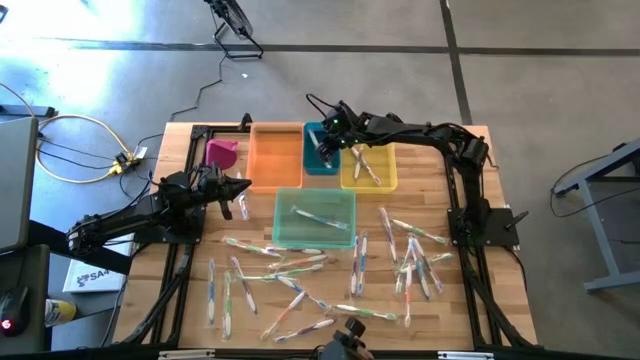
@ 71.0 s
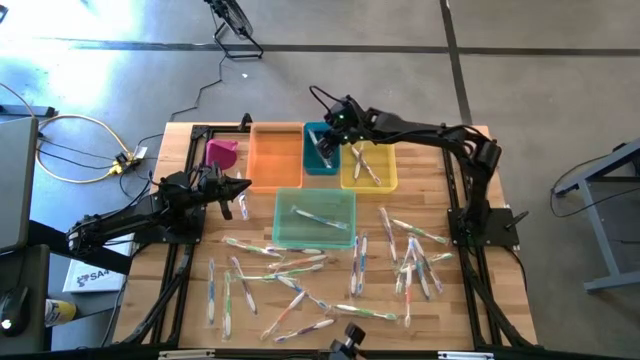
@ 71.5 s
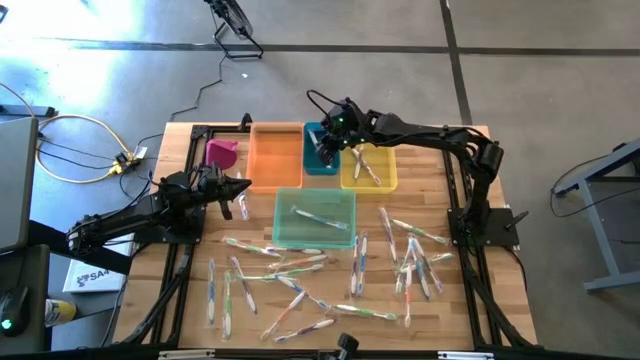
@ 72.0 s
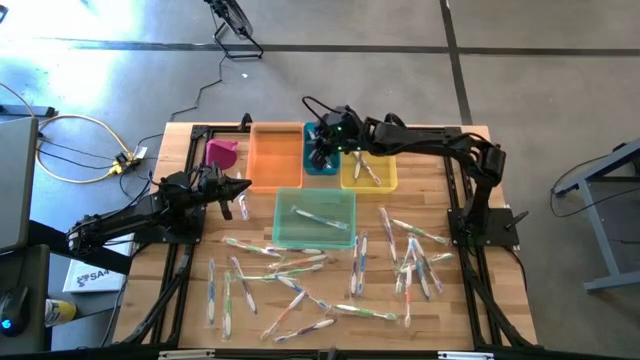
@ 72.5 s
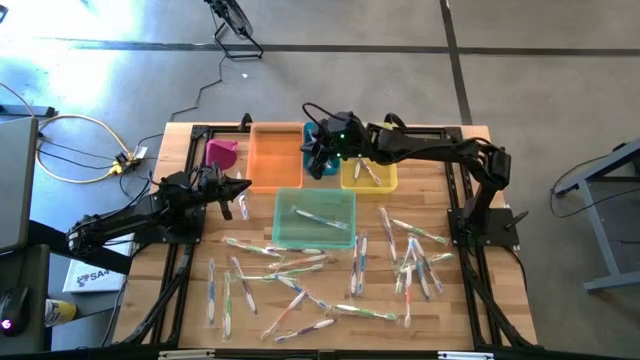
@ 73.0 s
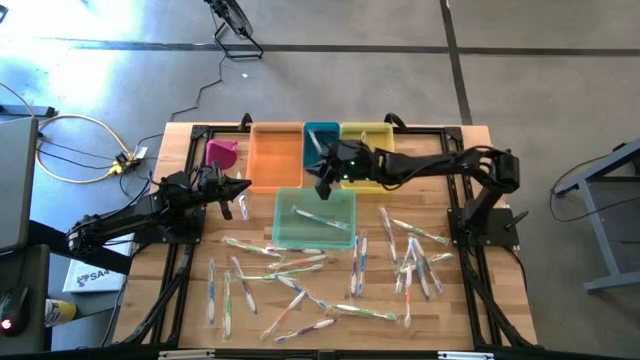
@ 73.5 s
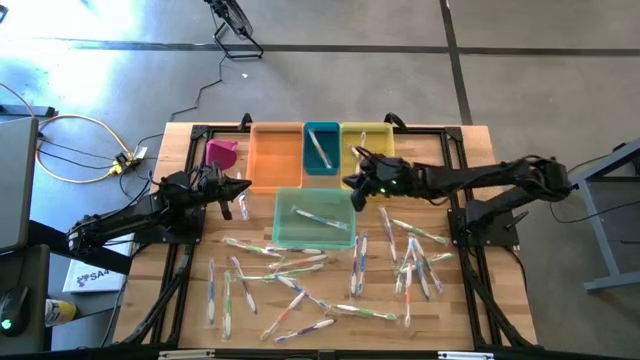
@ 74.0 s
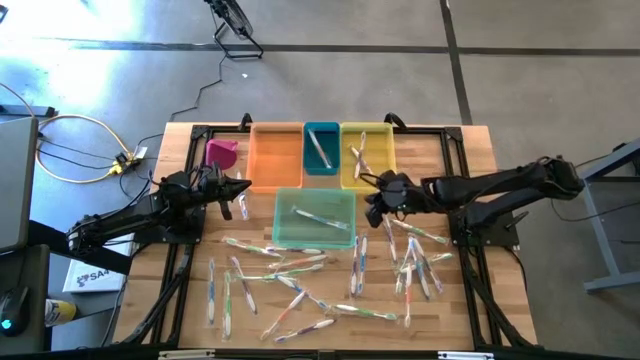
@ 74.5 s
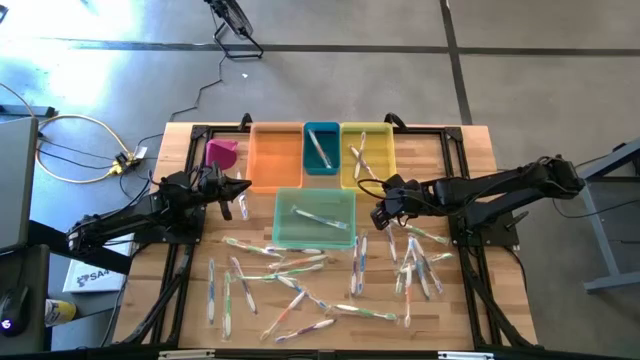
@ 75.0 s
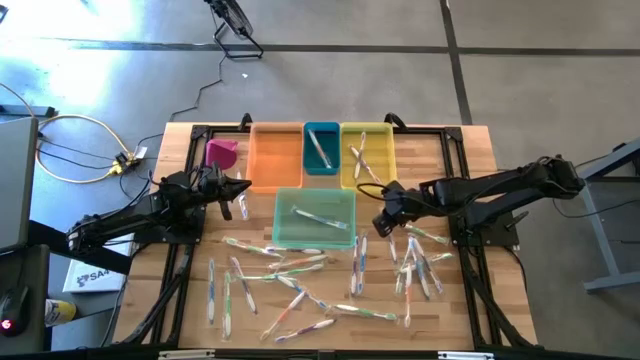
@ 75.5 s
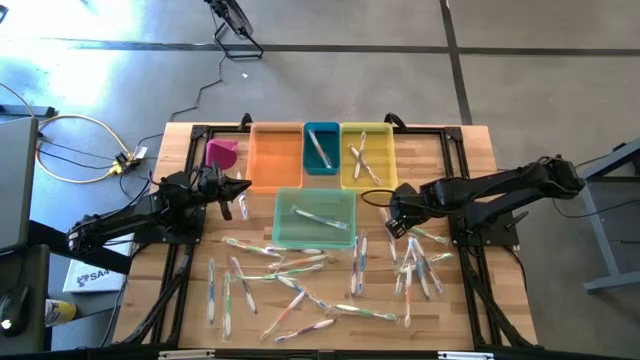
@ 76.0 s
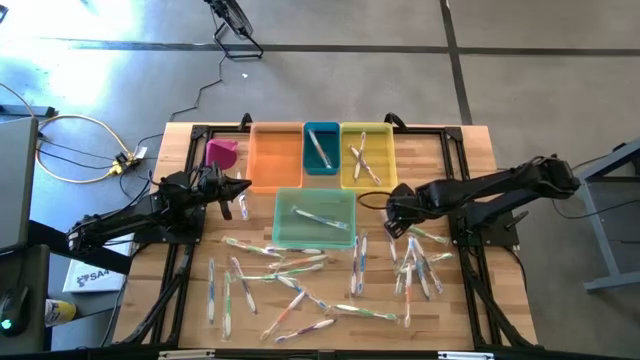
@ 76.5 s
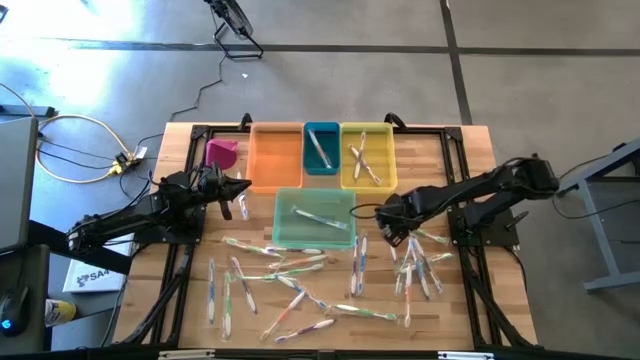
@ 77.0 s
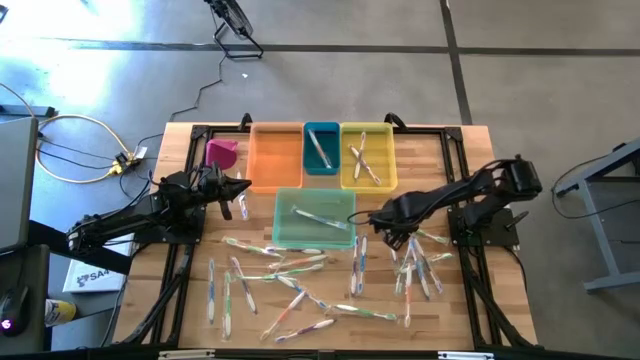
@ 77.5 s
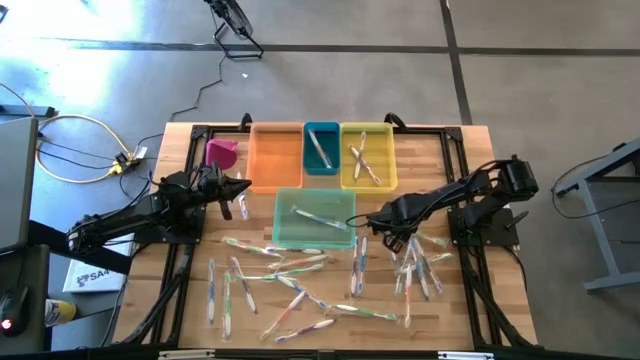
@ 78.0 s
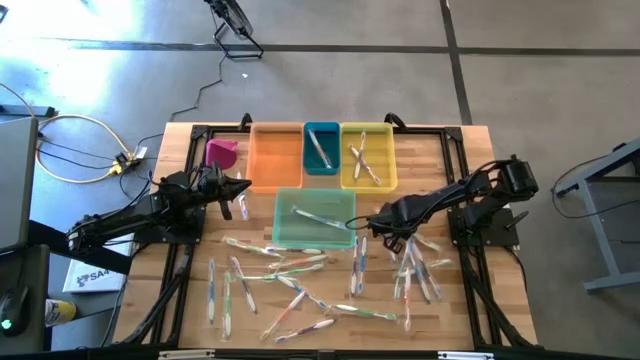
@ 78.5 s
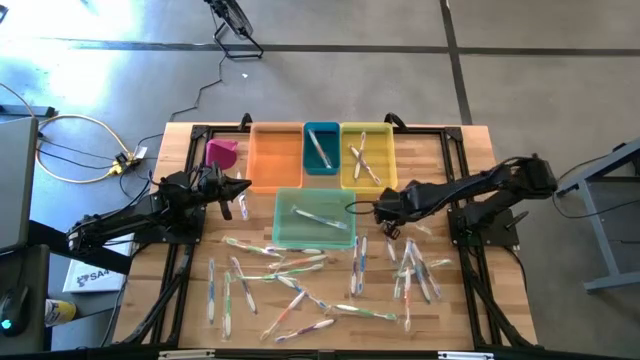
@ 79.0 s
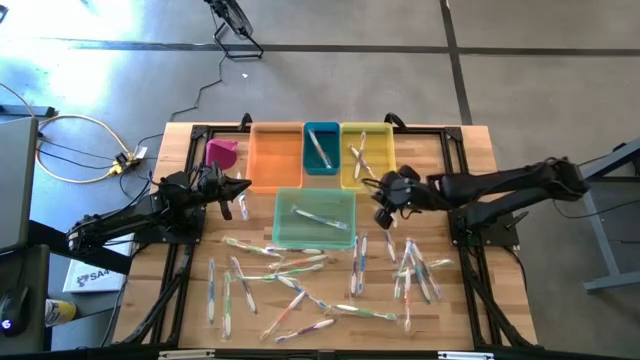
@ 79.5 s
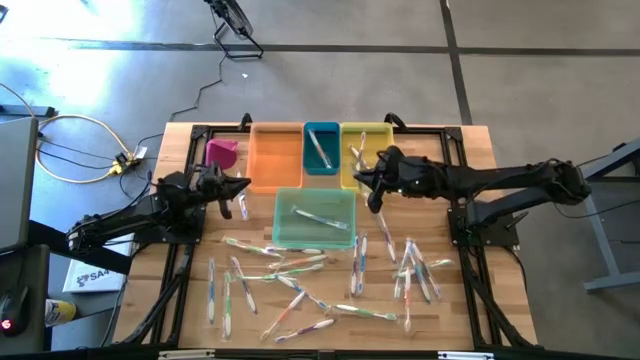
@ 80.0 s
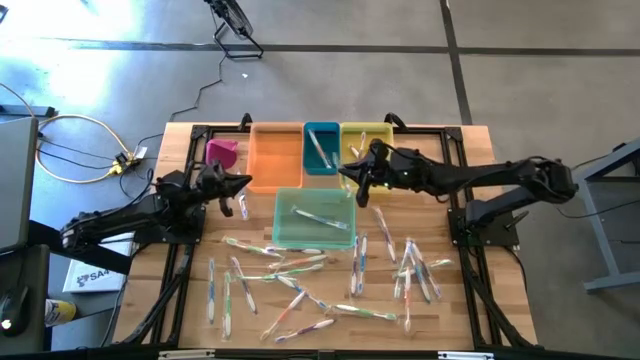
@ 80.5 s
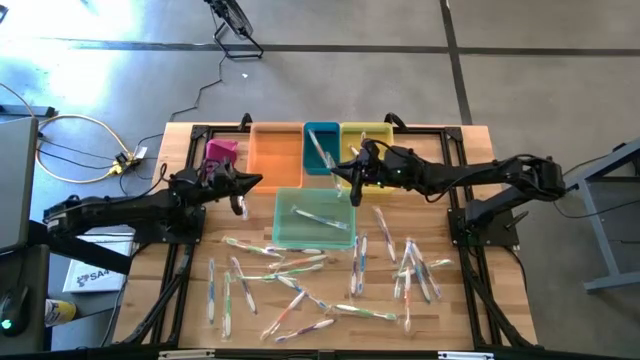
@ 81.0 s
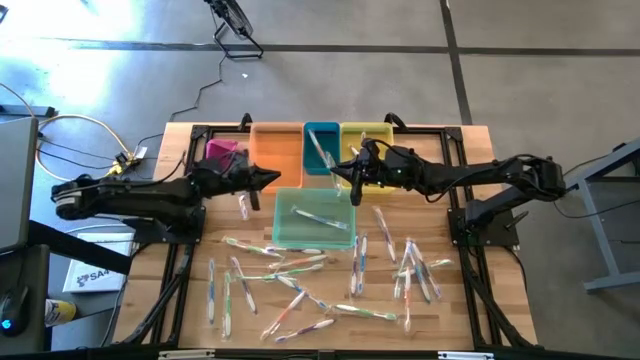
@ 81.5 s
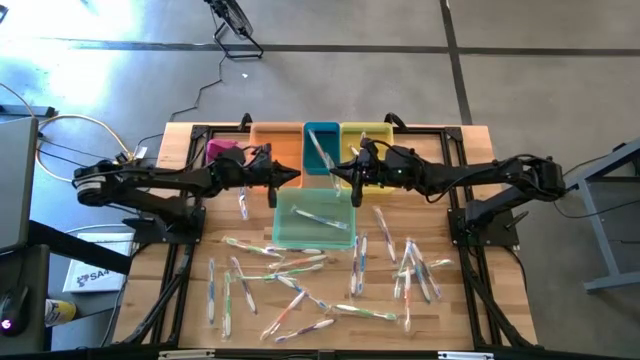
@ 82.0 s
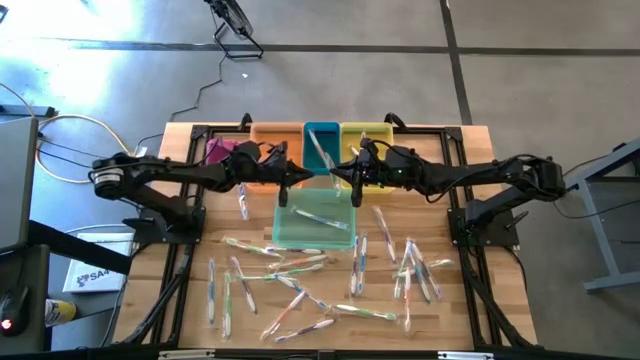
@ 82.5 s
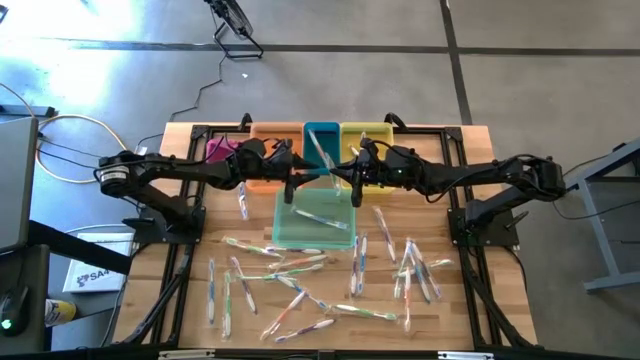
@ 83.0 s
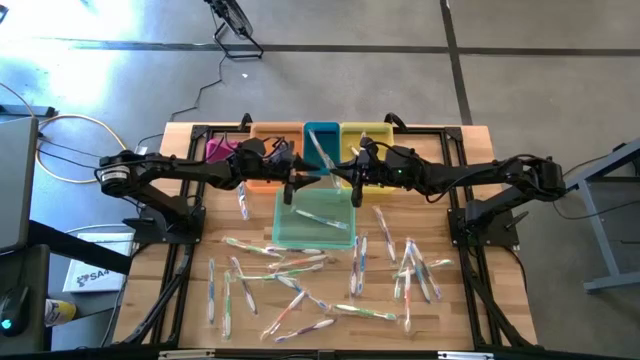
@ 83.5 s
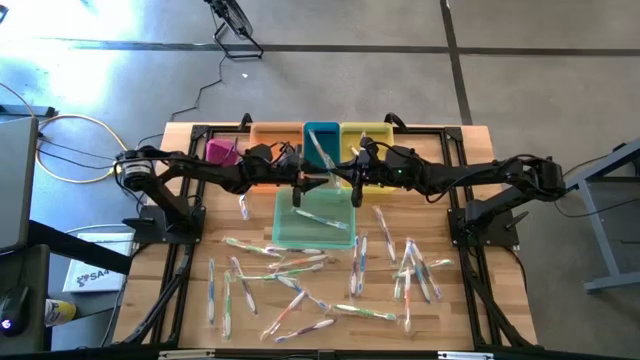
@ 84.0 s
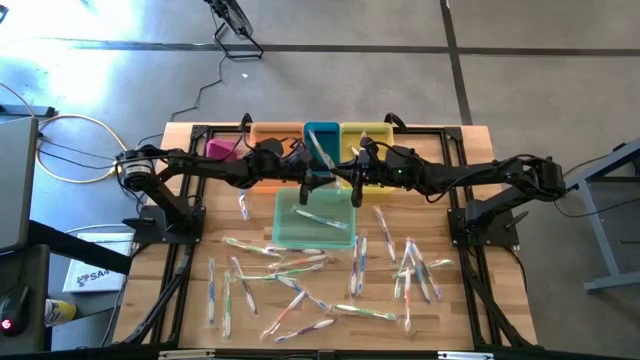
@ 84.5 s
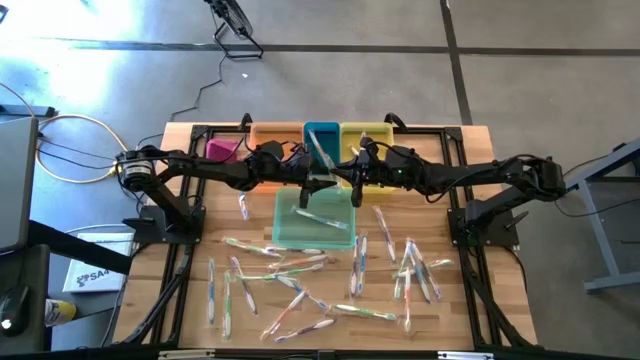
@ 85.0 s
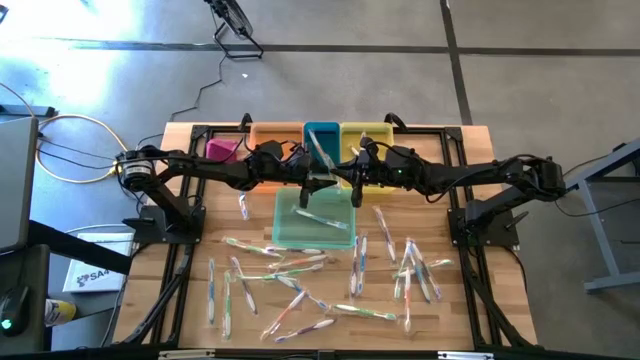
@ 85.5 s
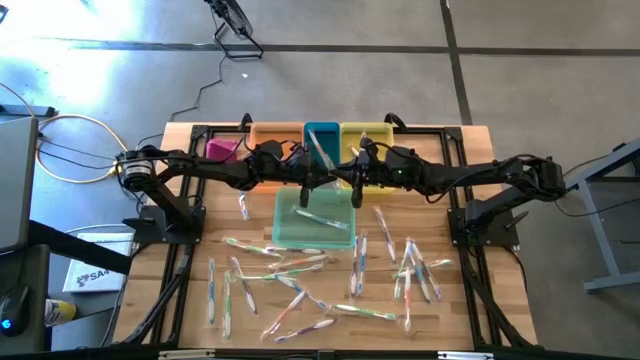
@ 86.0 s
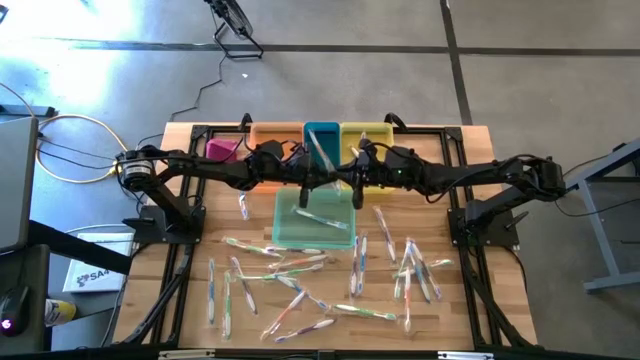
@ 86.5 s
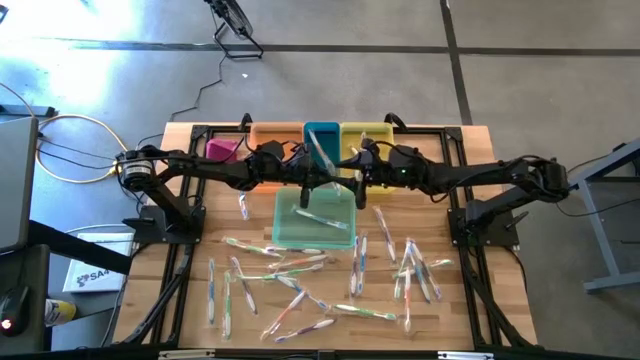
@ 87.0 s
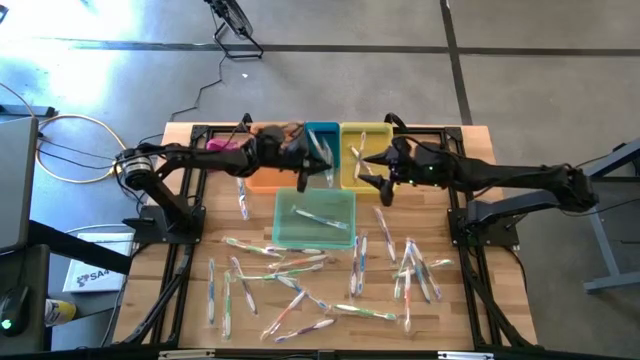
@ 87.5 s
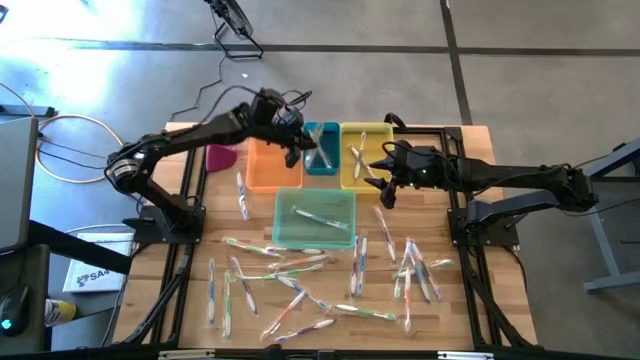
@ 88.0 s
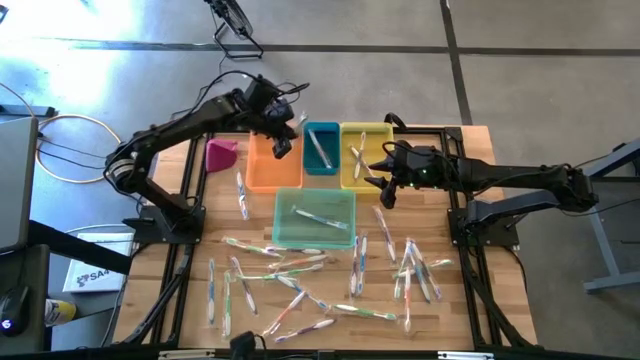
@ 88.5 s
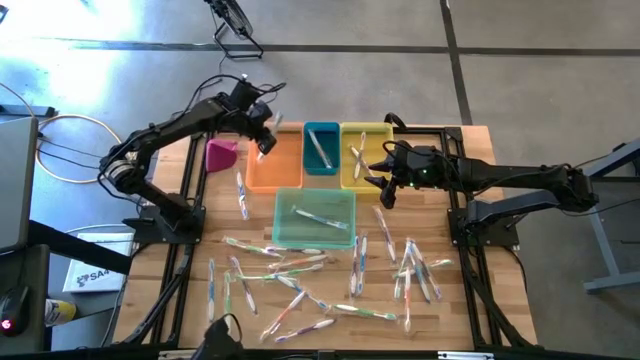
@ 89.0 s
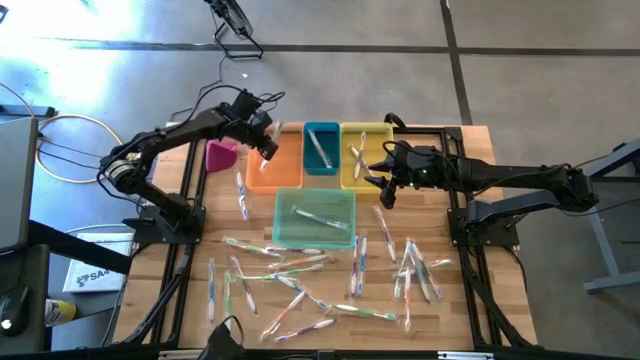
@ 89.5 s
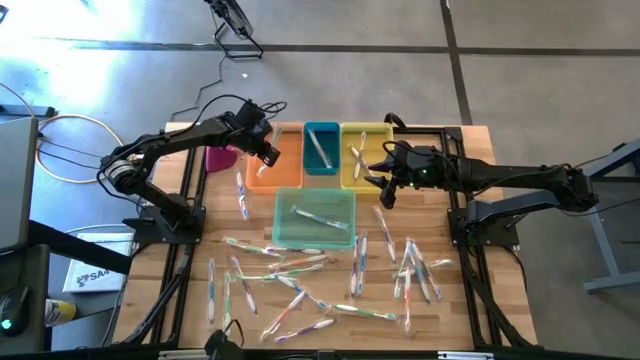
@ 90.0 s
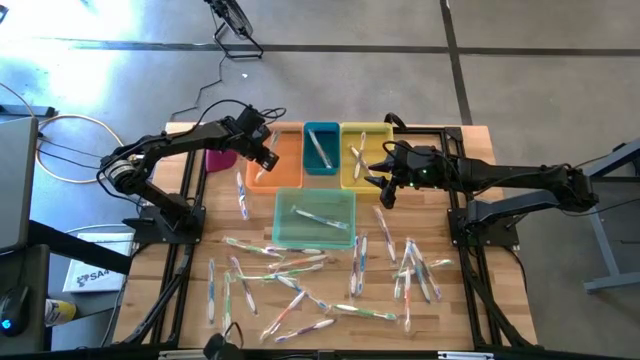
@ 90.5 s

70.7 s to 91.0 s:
Task: Pick & Place Toothbrushes
Put the green toothbrush into the orange bin
